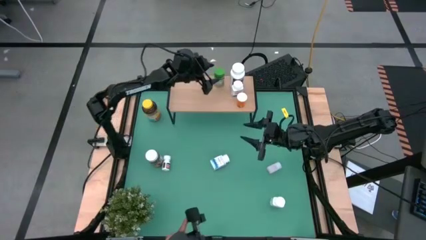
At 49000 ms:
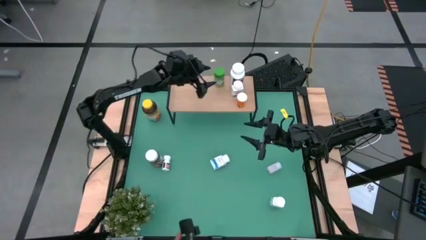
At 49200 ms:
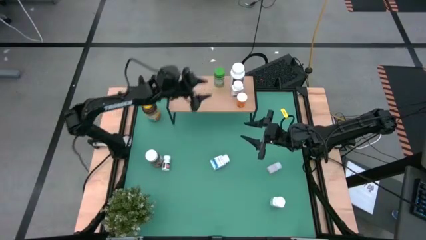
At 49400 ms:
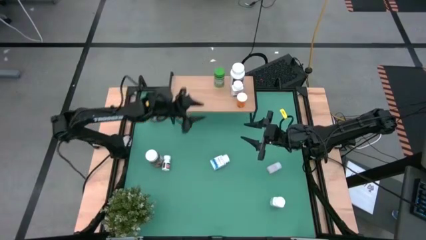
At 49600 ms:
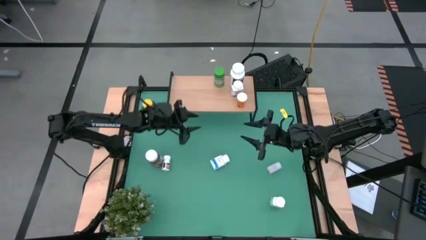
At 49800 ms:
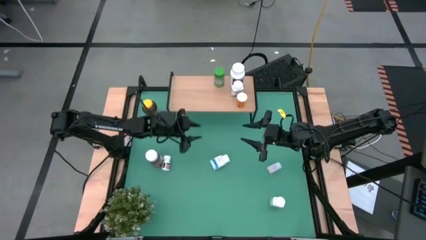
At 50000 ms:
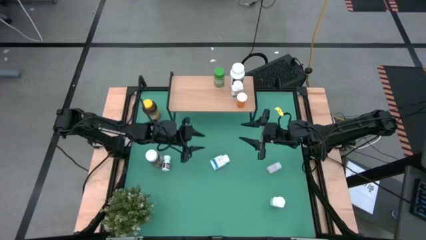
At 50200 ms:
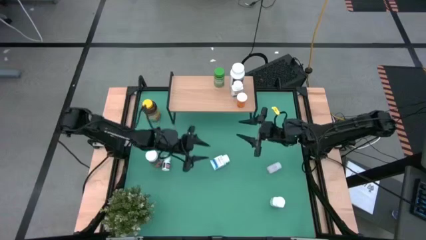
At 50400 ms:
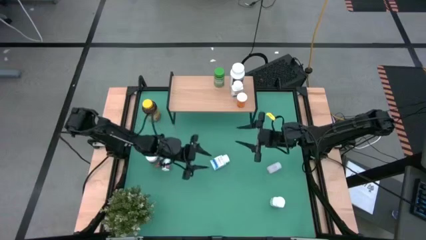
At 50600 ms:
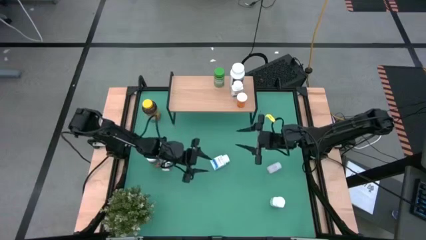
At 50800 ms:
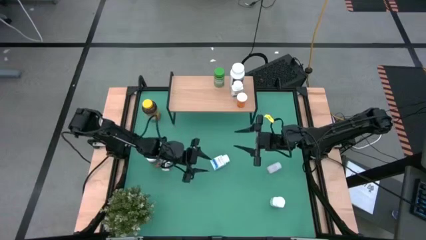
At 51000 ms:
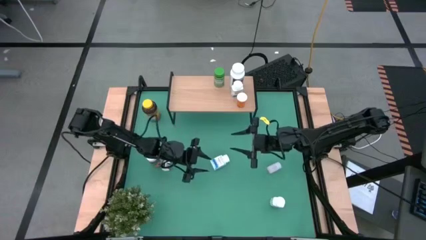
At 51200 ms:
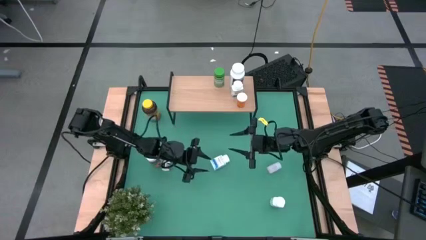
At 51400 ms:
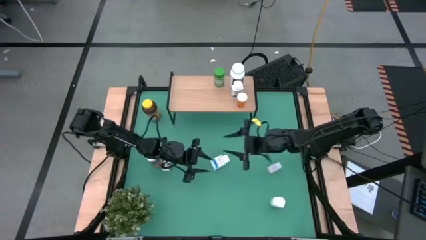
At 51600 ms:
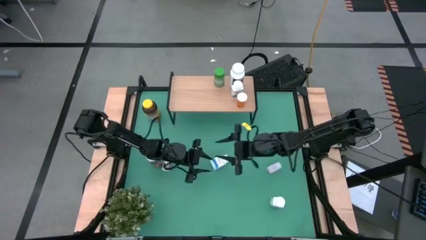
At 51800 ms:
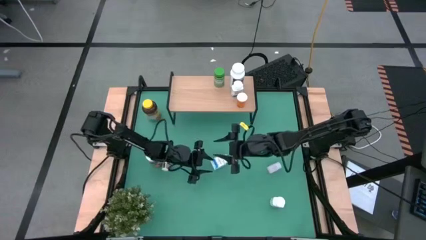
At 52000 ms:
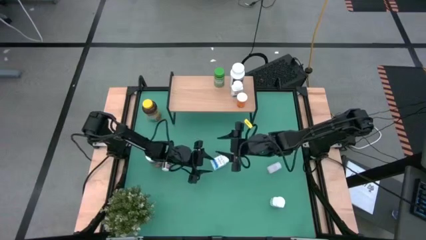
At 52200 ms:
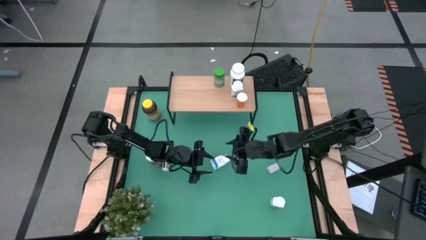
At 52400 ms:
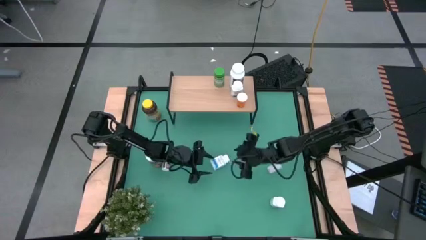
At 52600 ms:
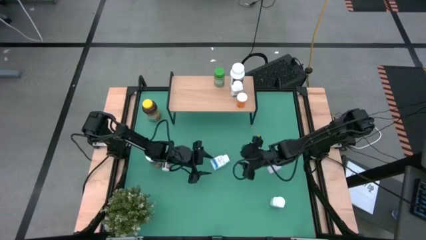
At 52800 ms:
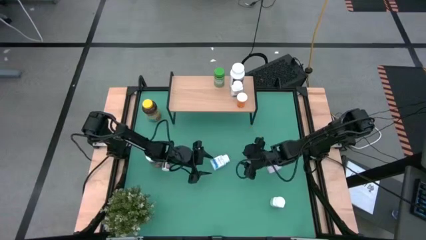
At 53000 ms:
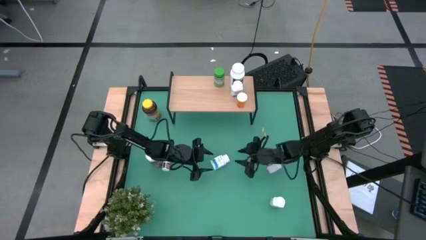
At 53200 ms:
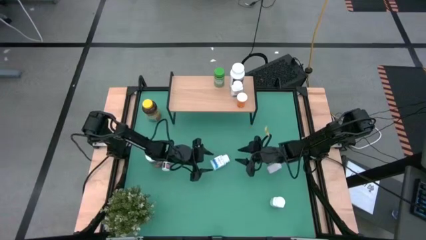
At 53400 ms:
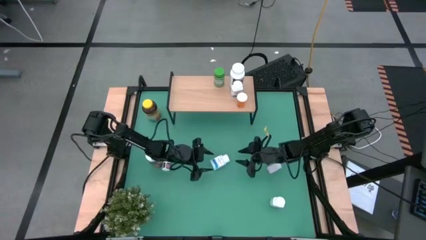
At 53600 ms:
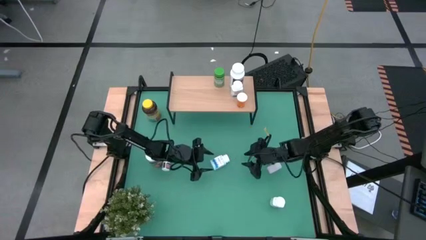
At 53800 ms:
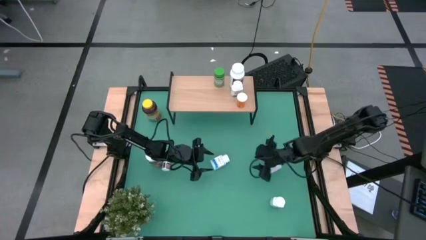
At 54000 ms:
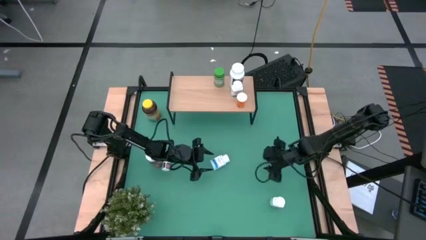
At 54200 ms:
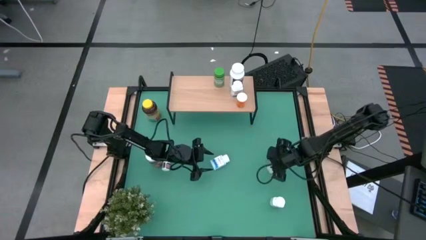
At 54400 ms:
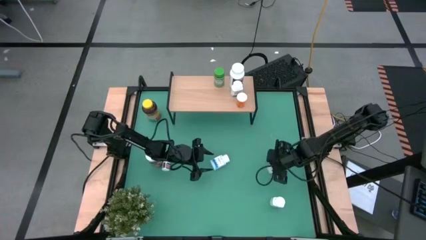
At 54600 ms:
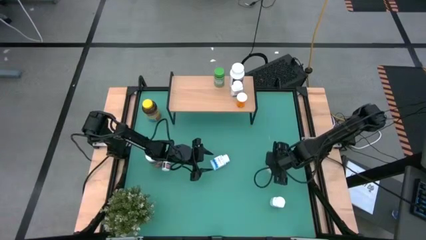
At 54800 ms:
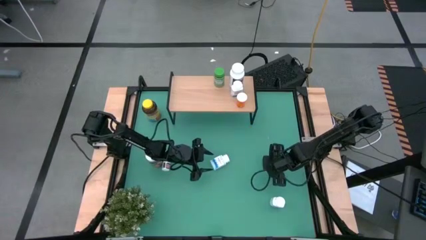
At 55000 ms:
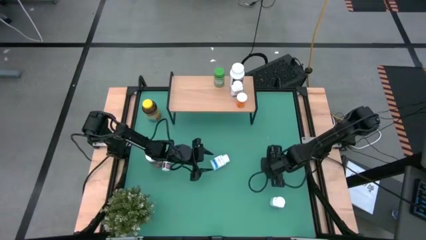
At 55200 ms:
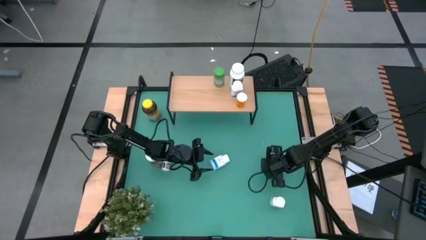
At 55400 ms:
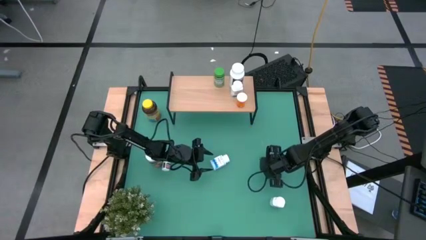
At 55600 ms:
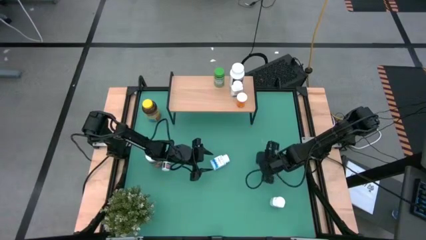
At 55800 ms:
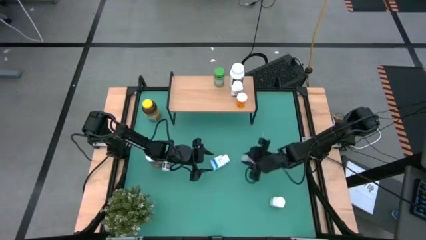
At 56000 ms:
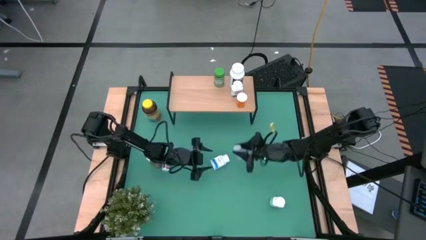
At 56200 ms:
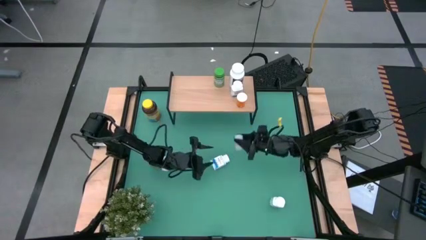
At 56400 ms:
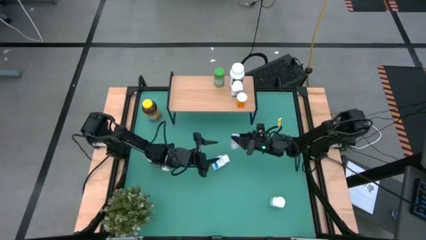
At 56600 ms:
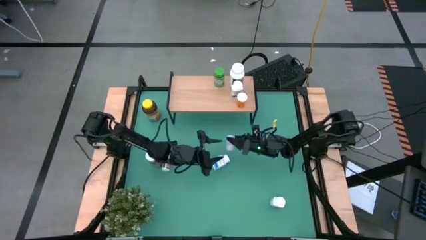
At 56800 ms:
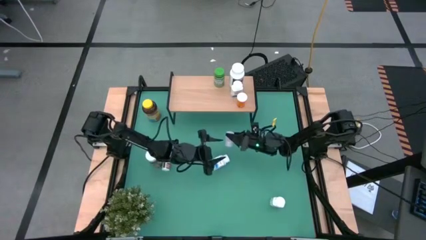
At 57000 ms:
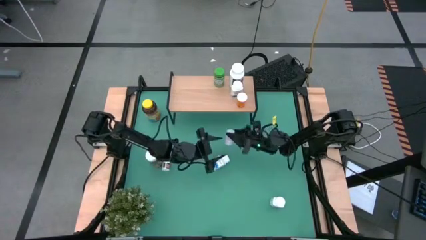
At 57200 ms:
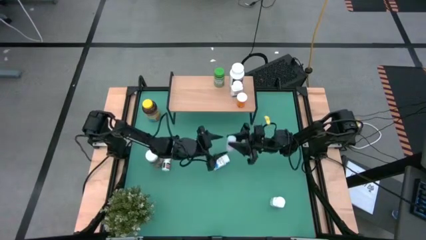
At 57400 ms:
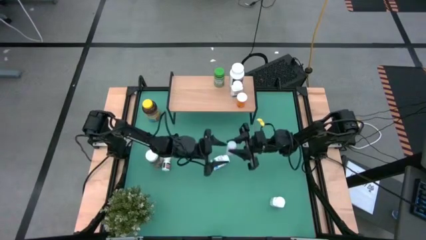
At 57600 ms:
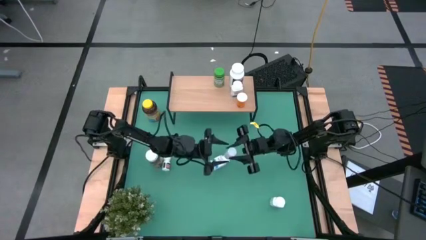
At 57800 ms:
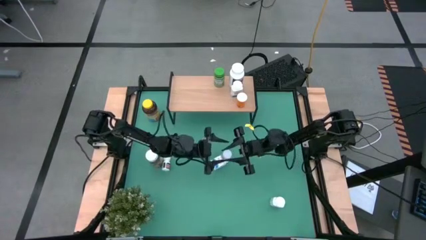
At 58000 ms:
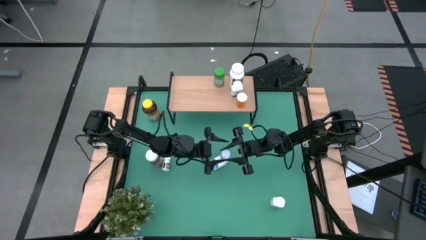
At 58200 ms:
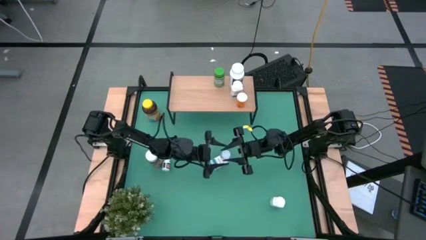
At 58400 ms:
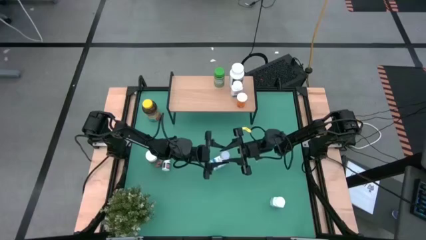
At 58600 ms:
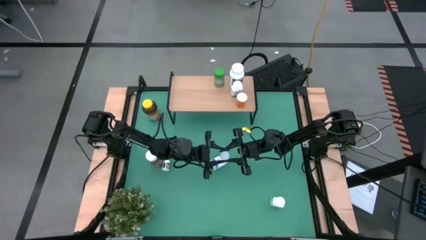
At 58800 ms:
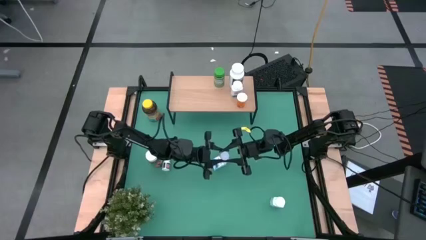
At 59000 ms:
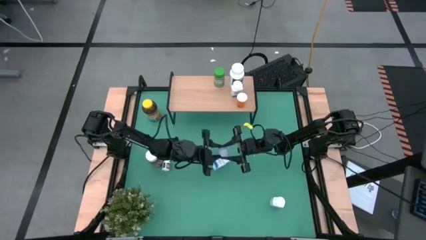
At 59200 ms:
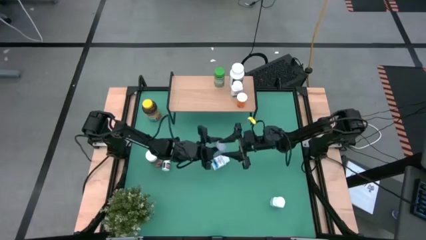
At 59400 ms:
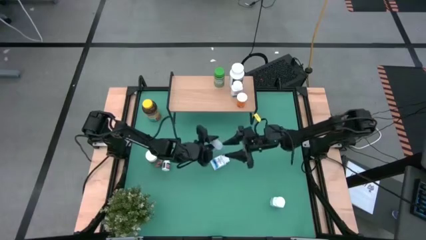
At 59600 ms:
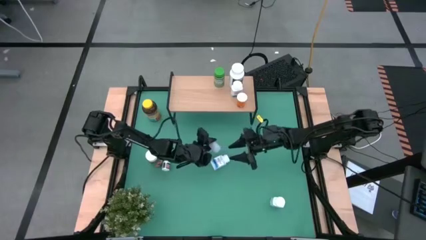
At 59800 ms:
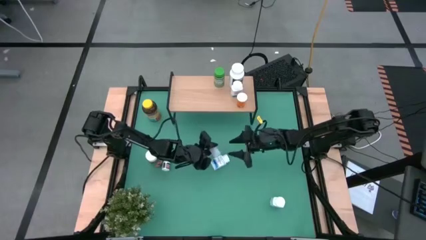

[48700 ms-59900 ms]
Task: Pick and place medicine bottles onto shelf by color
Put the transparent pill bottle on the shelf
